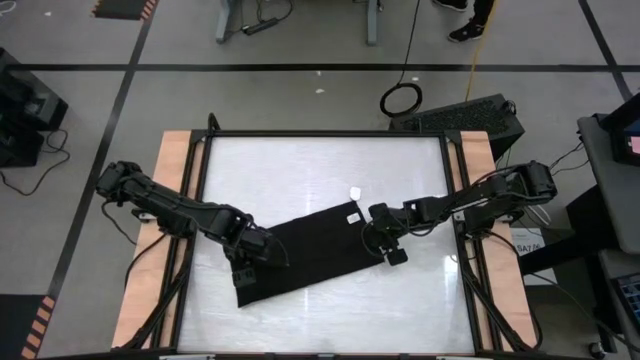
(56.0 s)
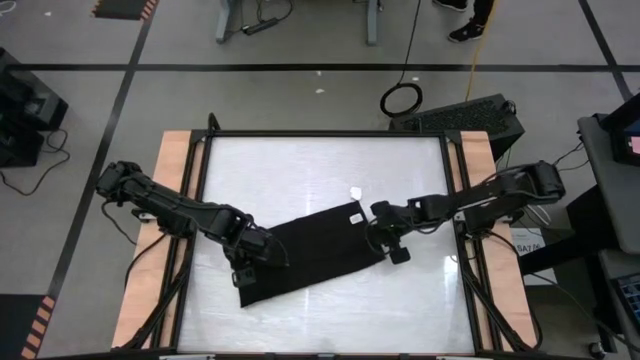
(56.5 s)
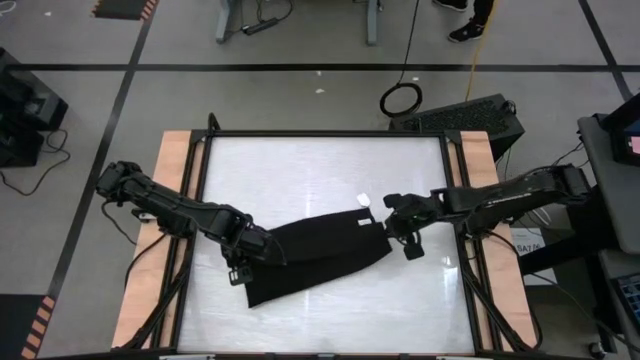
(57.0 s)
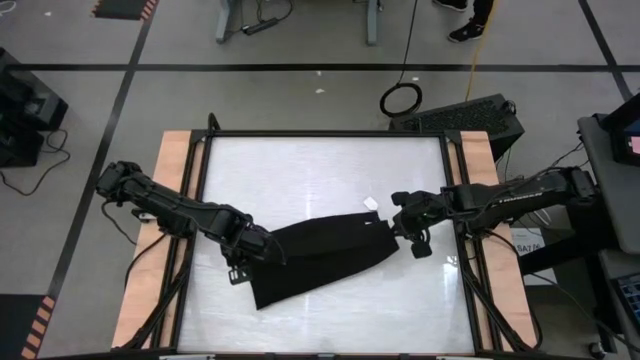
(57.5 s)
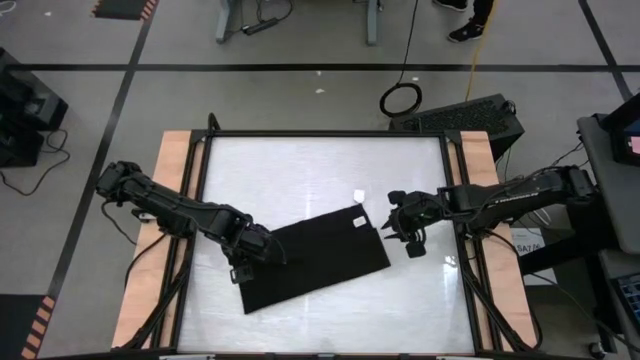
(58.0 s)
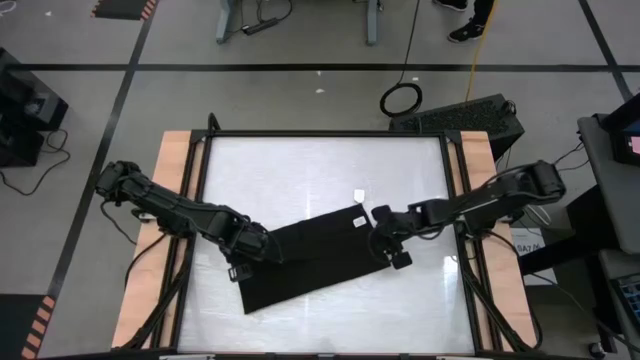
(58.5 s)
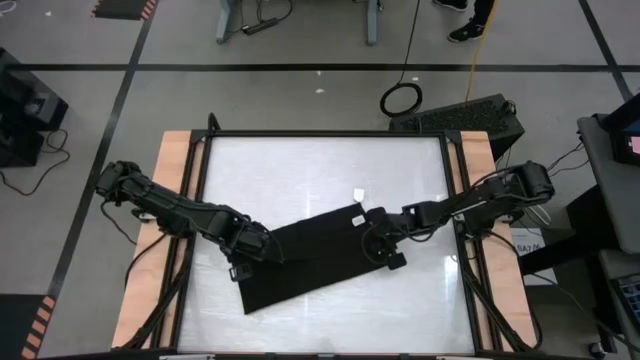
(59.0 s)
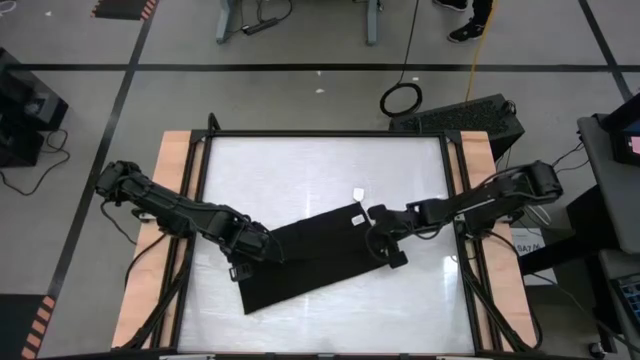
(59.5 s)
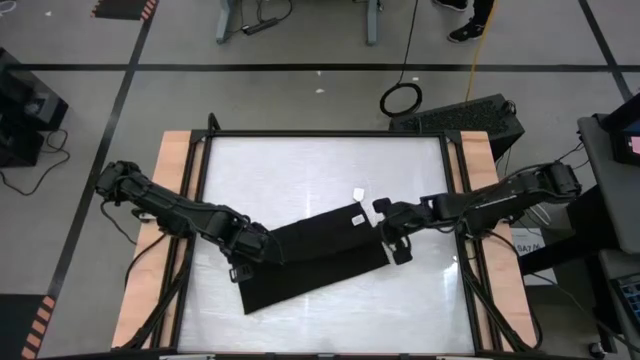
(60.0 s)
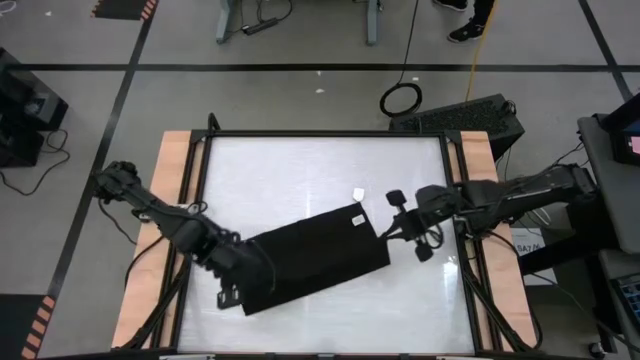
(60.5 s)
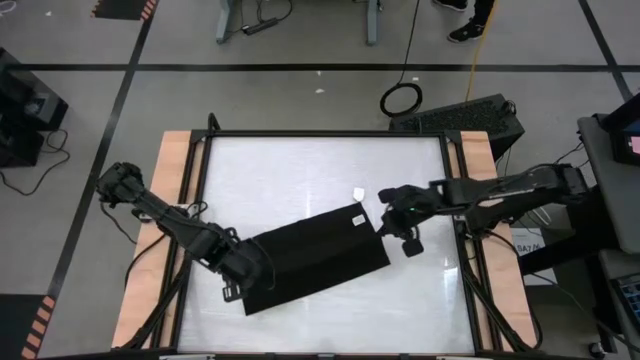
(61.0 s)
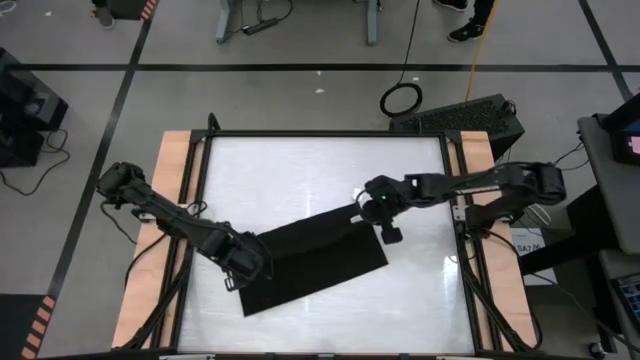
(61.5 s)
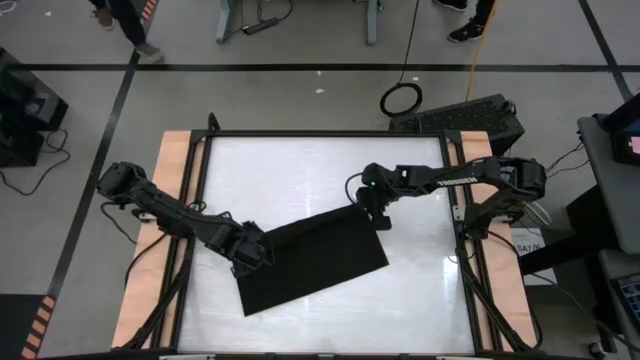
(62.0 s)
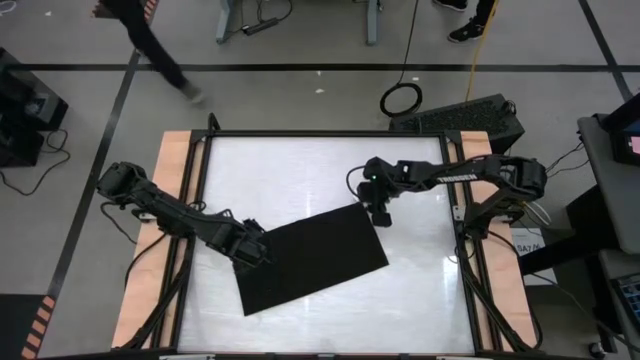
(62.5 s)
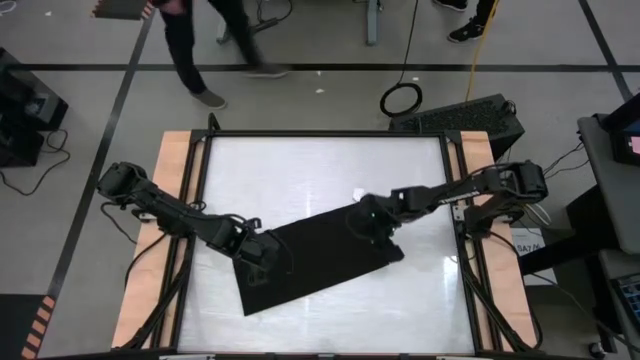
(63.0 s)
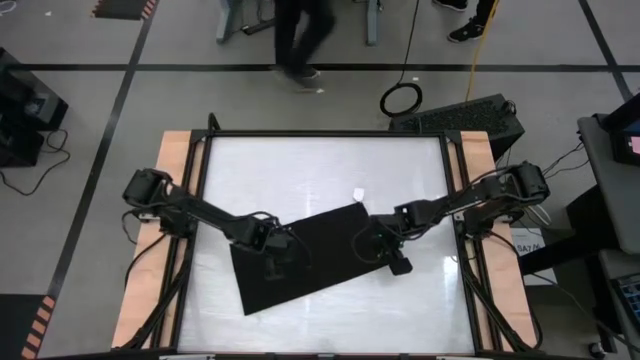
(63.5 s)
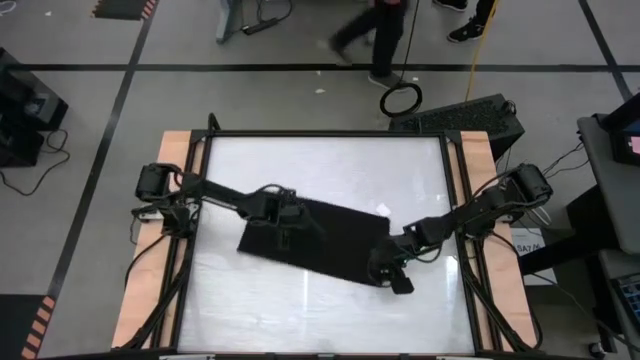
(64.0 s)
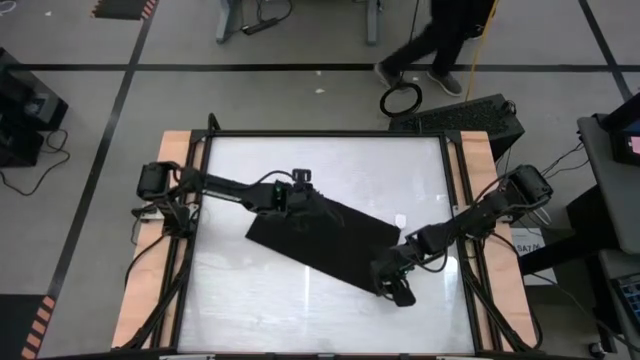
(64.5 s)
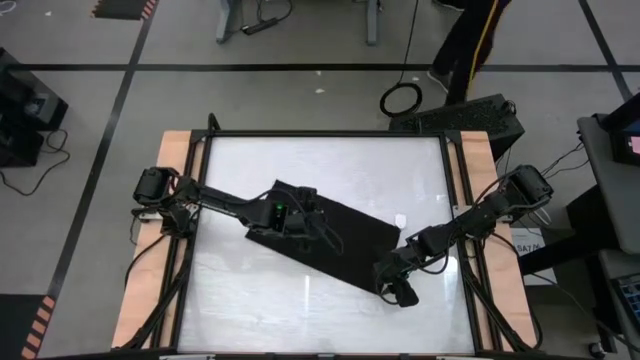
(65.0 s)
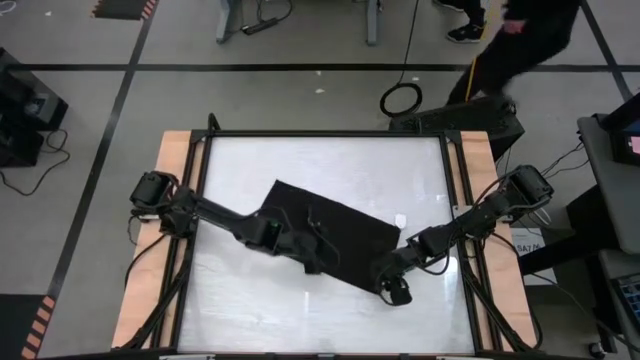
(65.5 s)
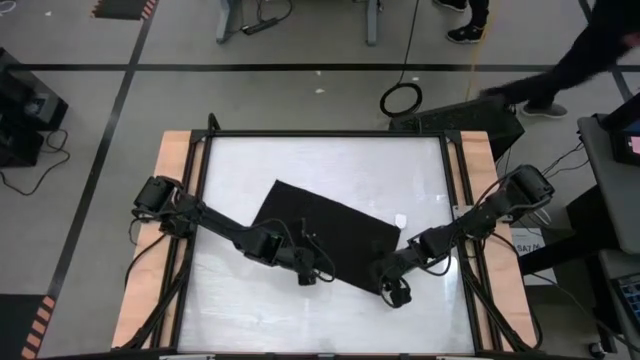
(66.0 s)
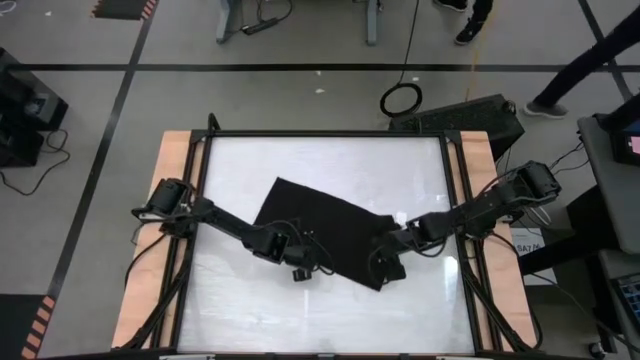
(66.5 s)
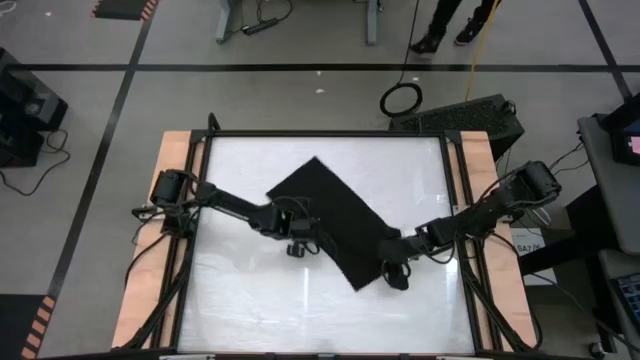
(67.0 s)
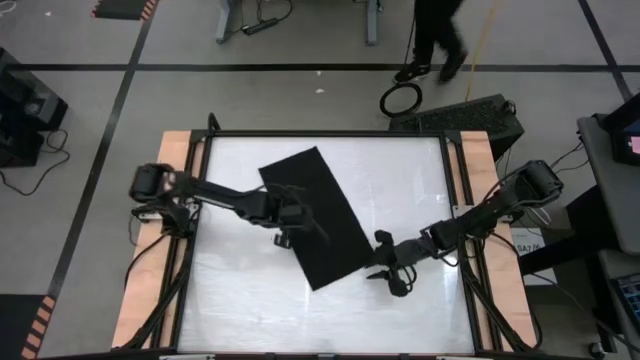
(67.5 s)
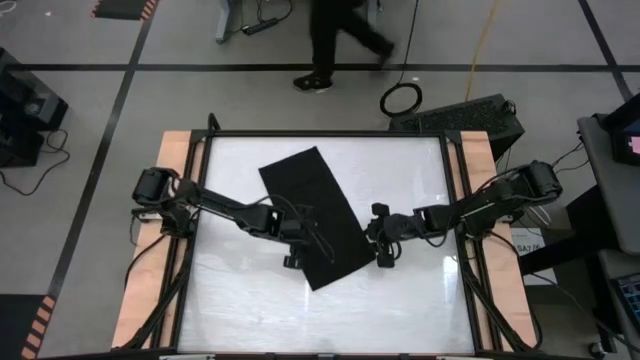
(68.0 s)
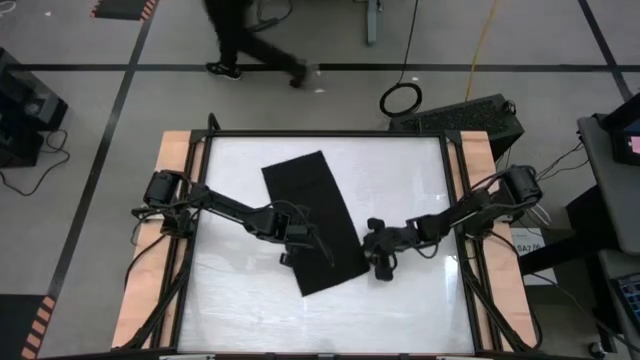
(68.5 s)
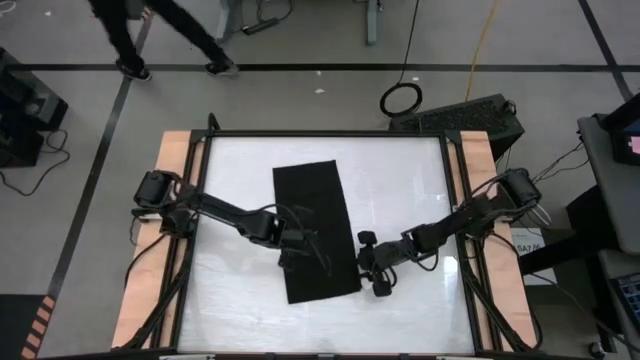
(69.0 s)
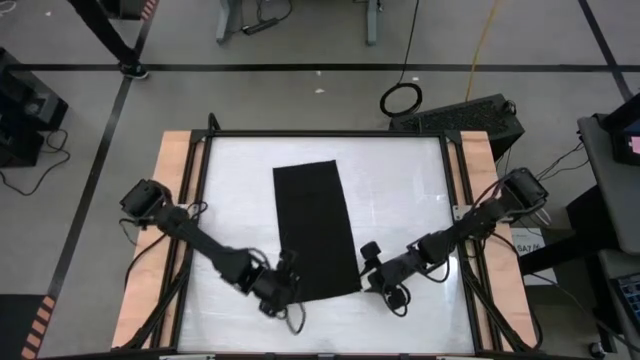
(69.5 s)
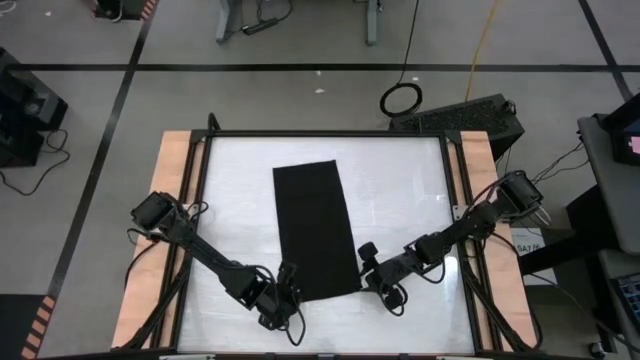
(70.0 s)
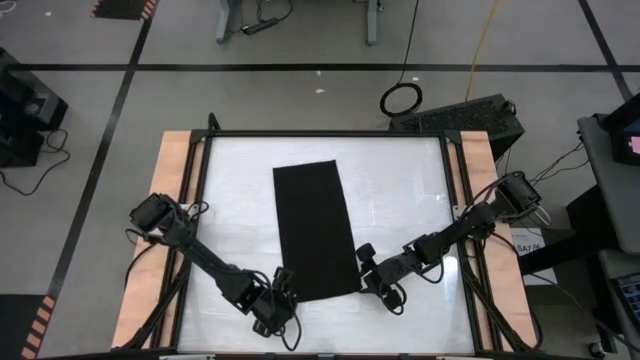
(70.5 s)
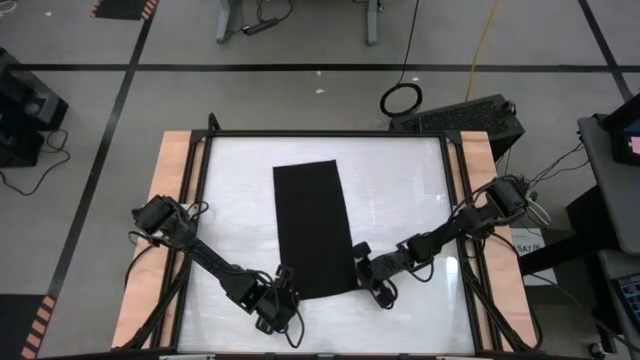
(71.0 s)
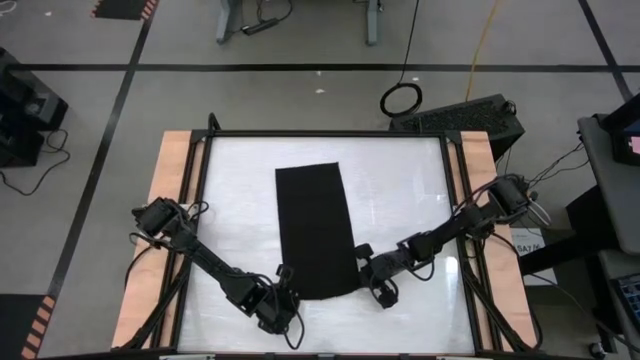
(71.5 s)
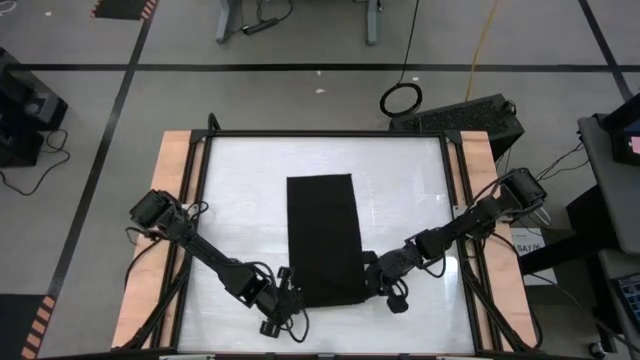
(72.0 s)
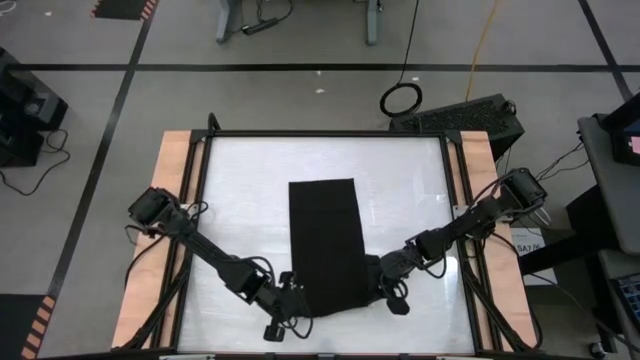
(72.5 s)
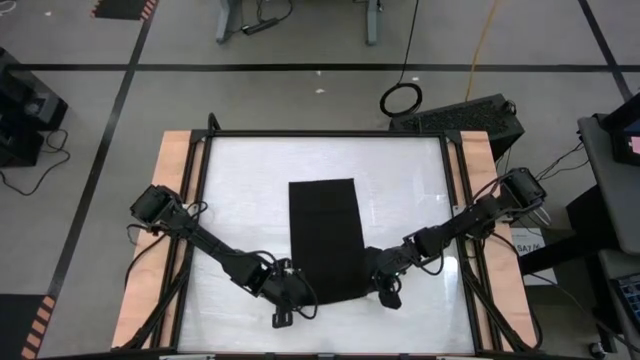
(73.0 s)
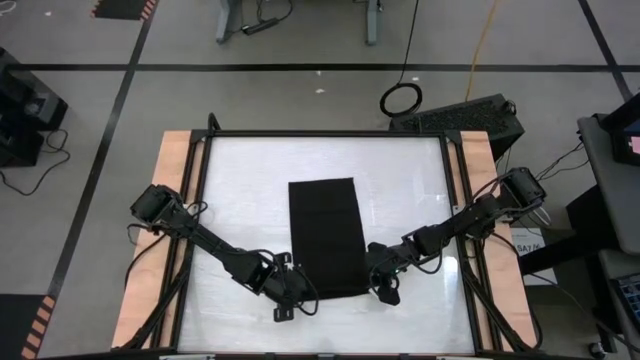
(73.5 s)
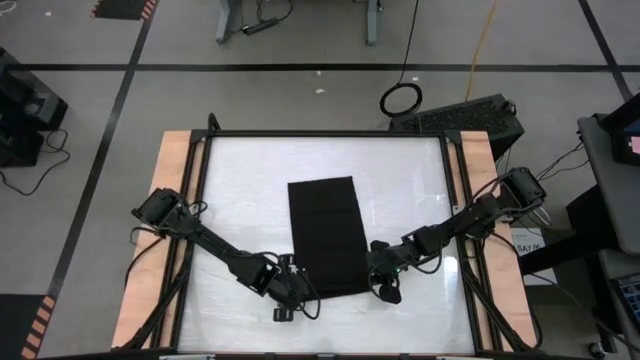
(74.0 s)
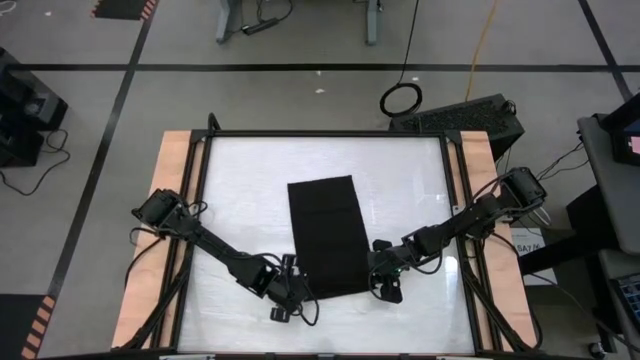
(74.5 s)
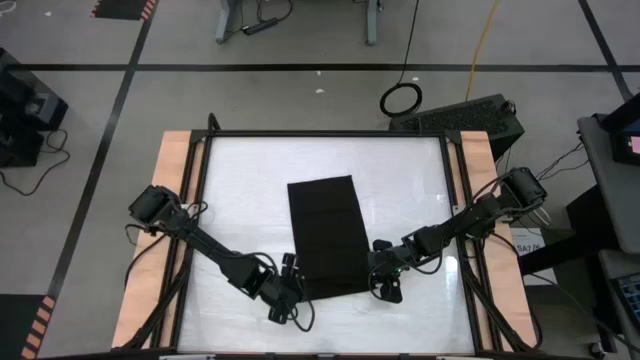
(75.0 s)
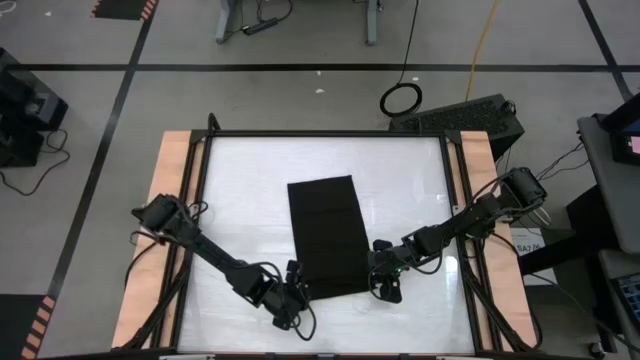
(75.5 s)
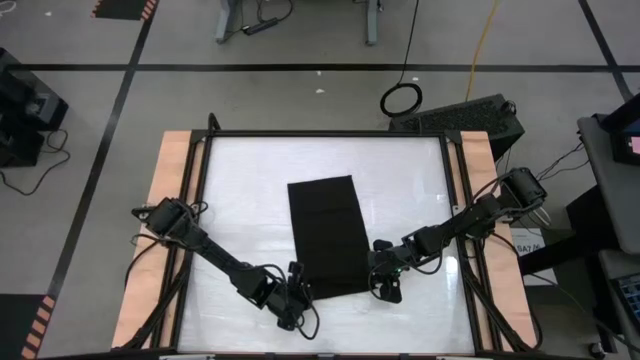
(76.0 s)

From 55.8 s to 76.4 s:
Task: Roll towel
Roll the towel
